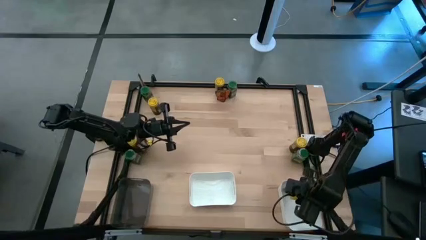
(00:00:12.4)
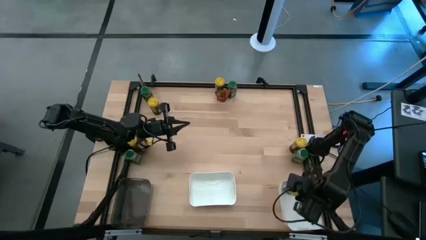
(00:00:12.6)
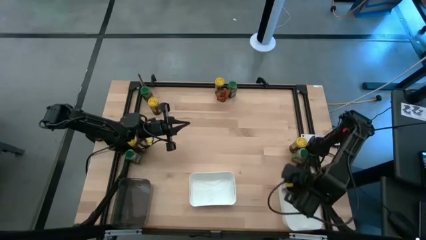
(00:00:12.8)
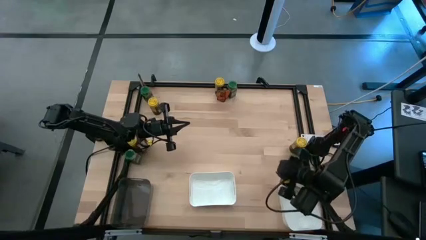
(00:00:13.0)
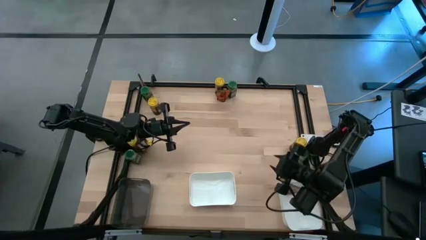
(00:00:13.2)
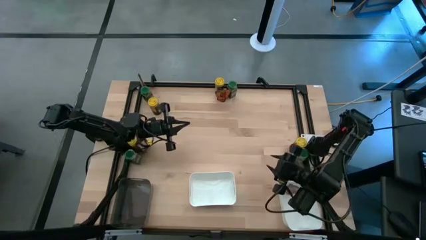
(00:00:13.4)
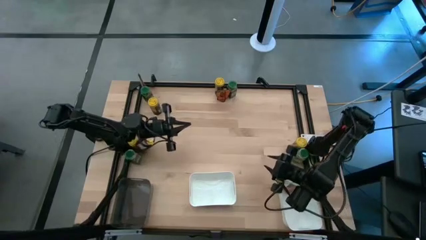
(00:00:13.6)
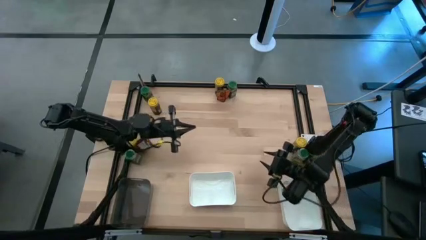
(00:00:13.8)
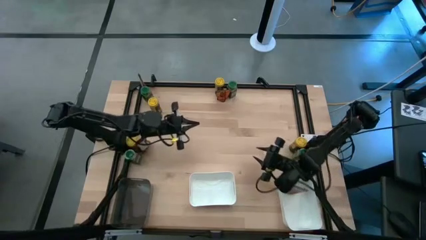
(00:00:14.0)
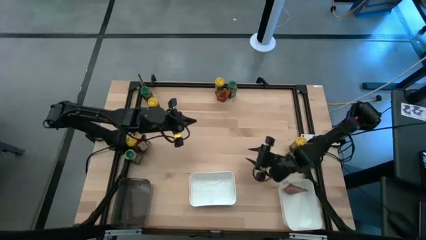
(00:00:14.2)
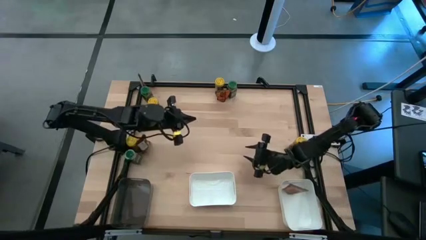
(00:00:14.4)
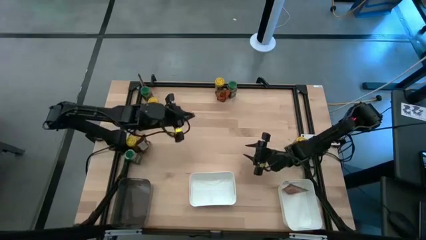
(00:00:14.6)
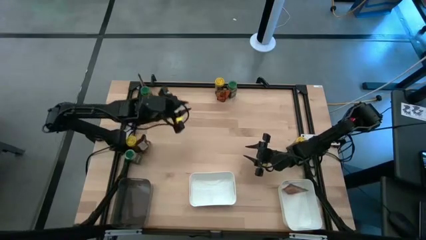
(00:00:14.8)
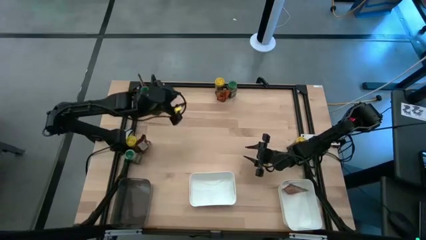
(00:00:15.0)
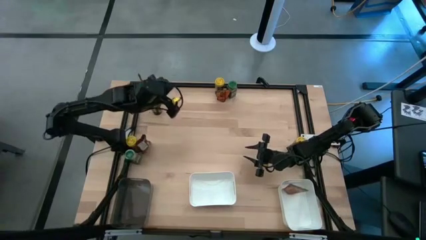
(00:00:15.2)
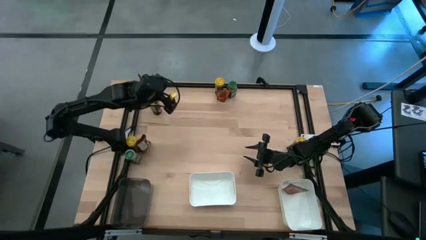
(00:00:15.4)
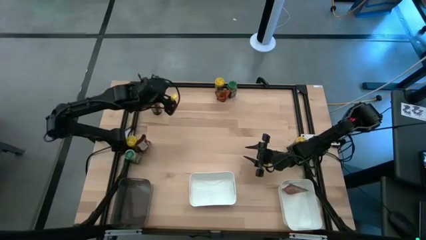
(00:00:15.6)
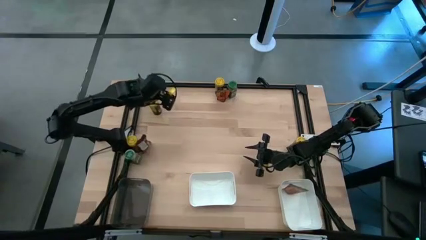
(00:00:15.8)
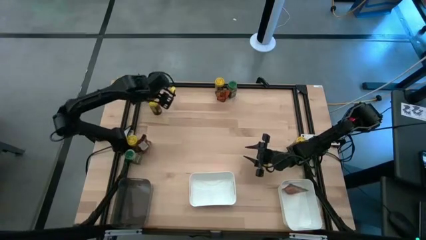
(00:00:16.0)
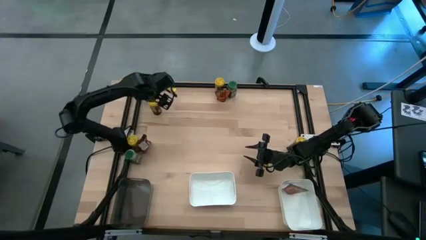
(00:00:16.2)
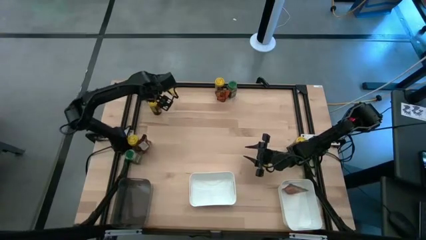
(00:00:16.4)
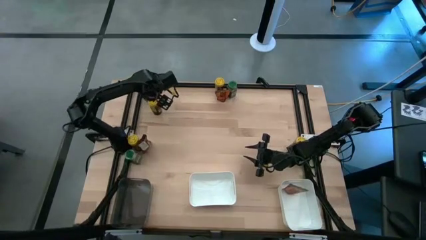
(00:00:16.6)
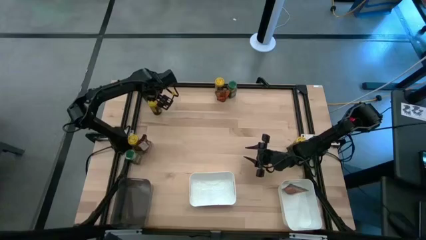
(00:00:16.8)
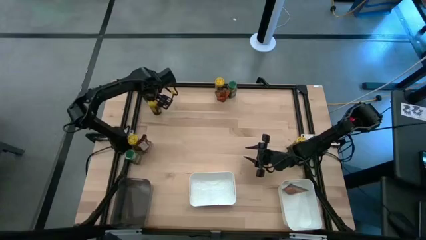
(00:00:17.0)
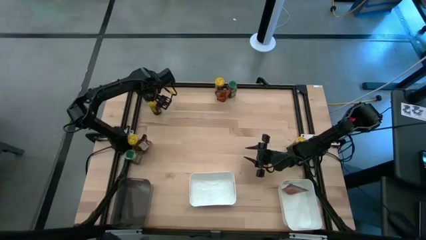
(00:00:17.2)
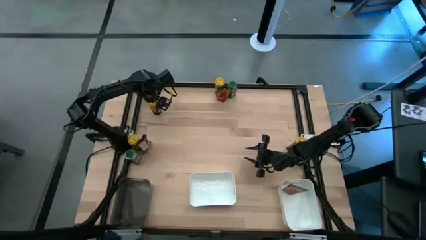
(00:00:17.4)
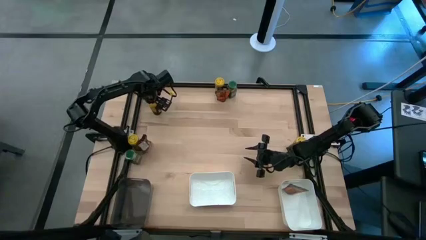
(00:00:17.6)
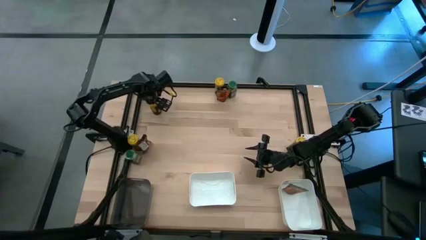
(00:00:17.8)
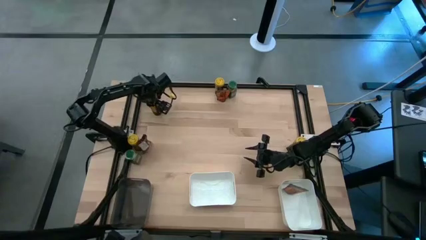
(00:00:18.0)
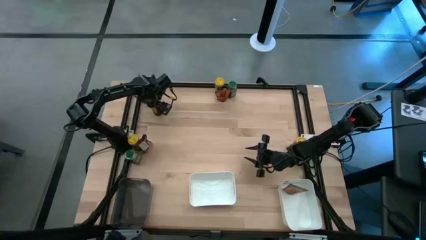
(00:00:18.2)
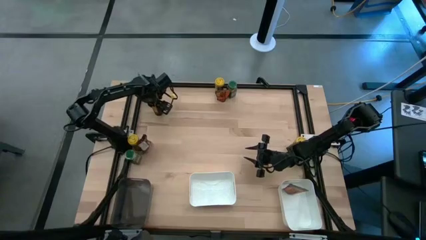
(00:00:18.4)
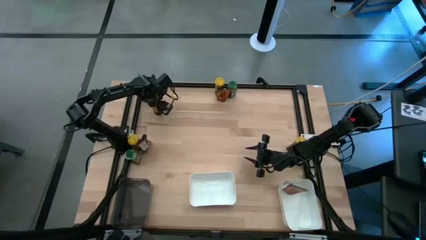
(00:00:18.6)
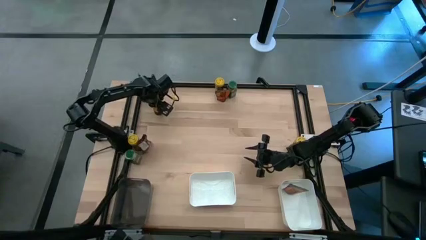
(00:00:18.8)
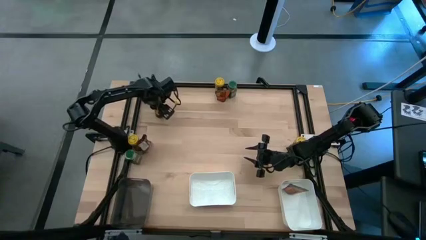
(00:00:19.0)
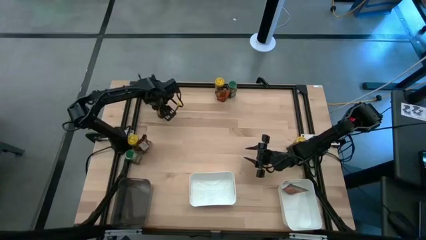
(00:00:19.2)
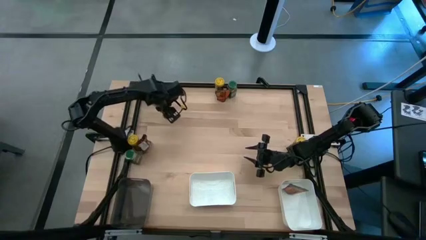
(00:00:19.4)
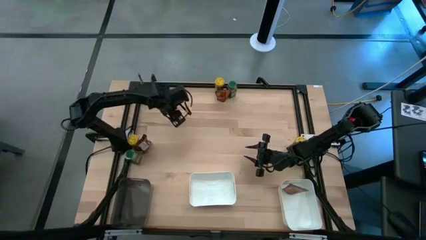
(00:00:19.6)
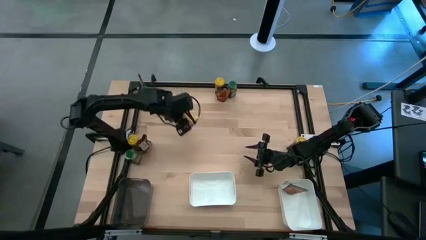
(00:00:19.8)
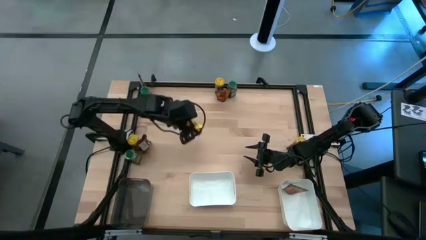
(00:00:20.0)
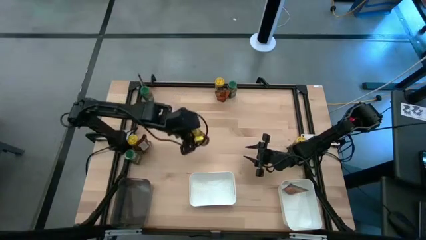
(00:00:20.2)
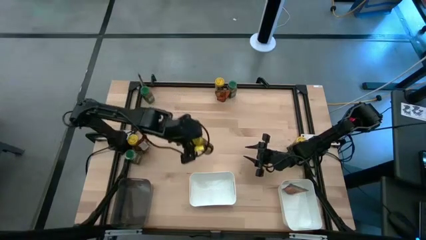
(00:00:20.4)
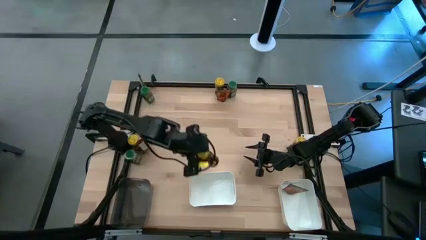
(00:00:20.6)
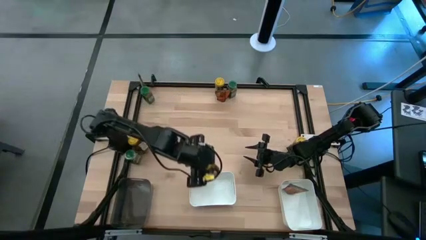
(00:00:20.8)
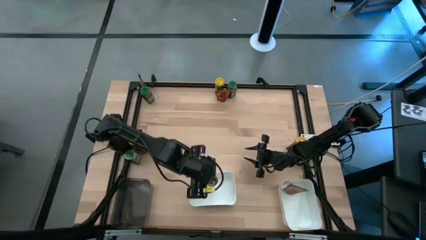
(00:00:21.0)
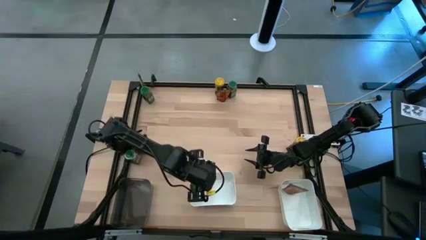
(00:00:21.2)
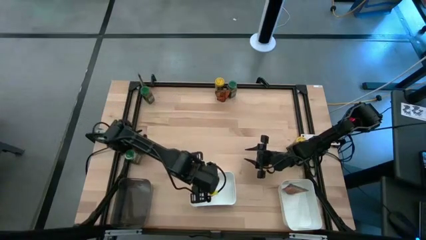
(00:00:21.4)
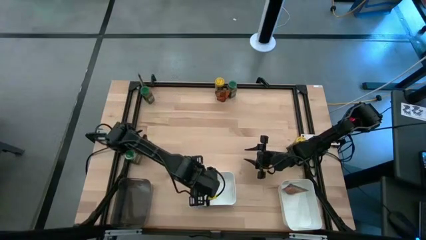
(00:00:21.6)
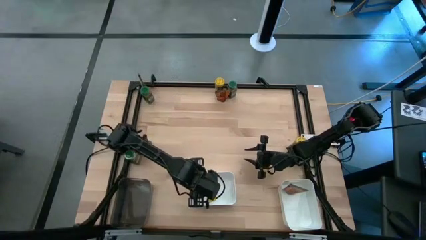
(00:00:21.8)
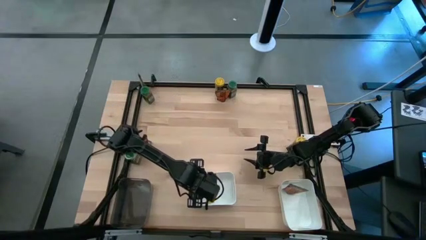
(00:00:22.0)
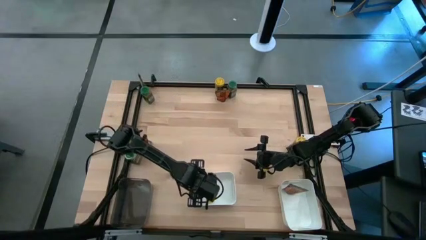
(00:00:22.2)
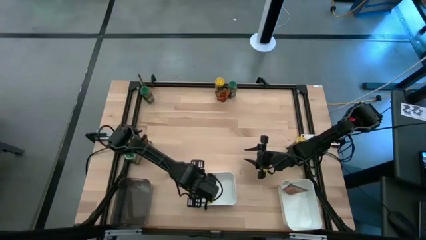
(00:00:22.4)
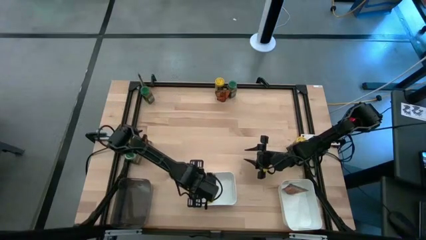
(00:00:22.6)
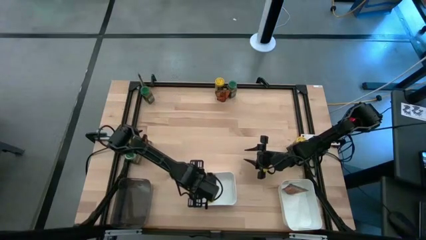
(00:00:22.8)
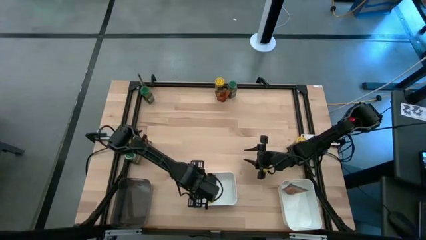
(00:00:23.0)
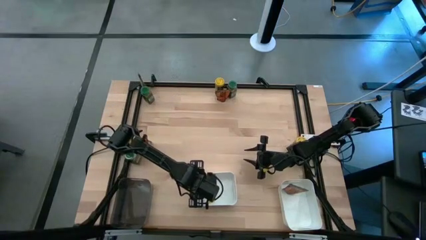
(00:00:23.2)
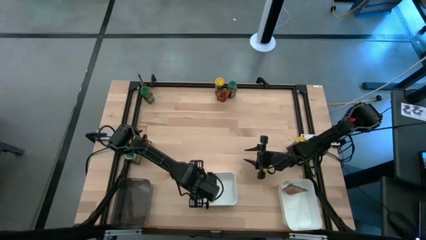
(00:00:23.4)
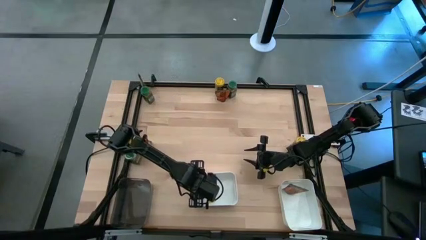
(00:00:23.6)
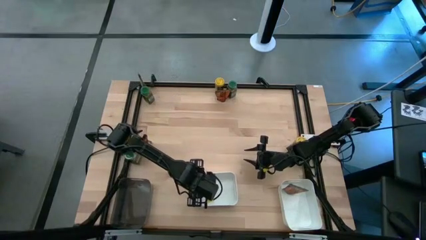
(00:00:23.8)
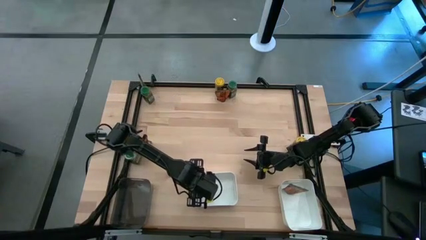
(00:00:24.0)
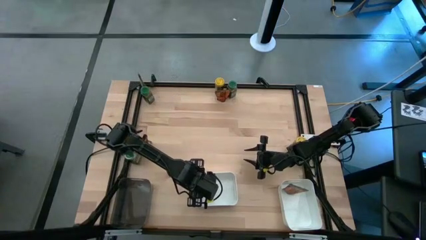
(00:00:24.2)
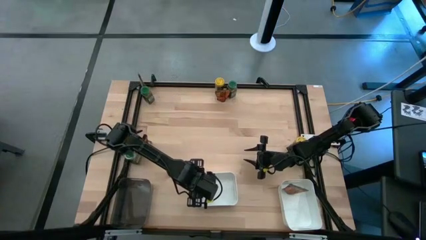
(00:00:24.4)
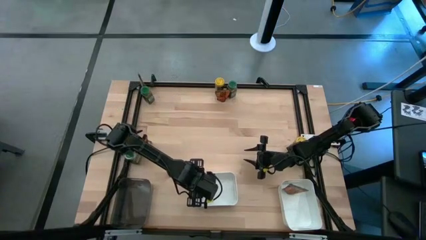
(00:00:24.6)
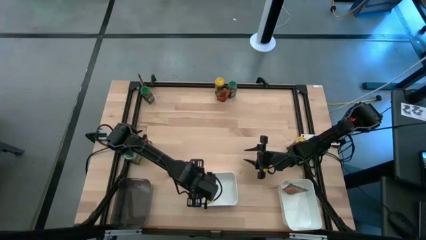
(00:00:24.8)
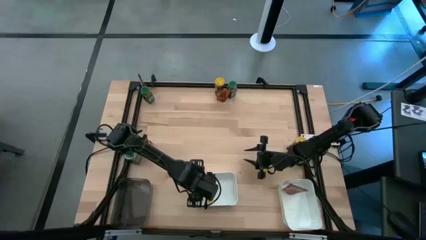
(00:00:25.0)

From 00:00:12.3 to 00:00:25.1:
Task: Sort spices by type
Put the top left yellow seasoning bottle into the left white bin
